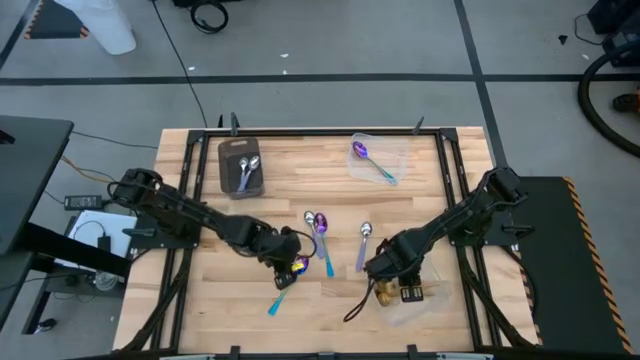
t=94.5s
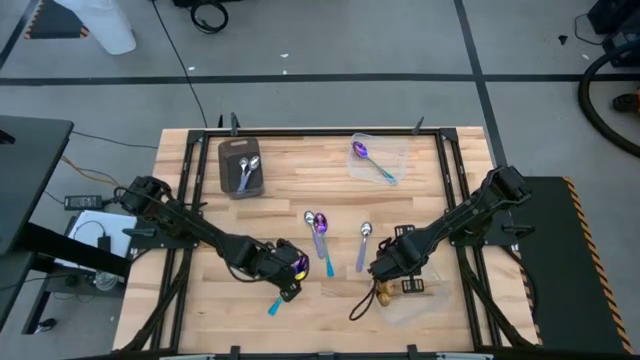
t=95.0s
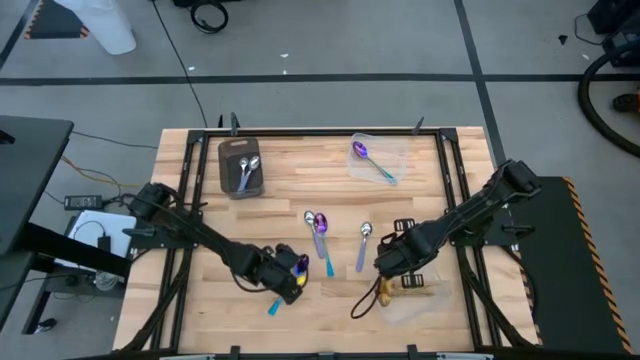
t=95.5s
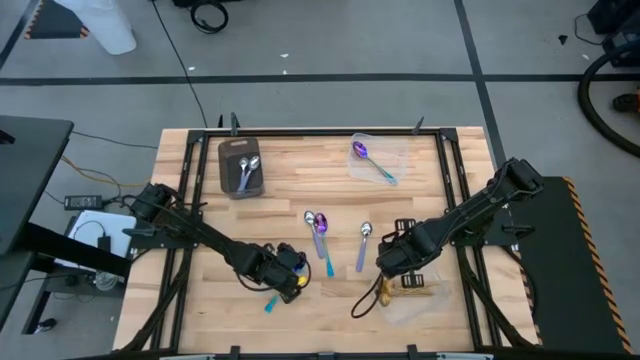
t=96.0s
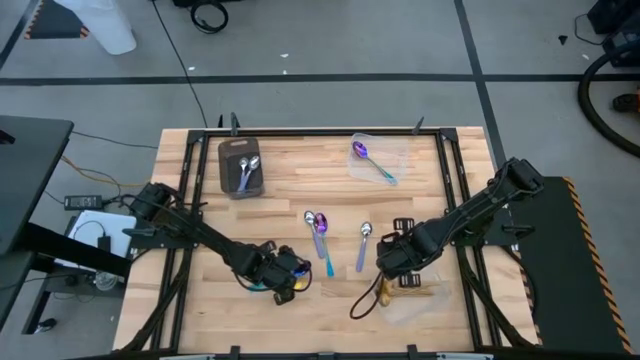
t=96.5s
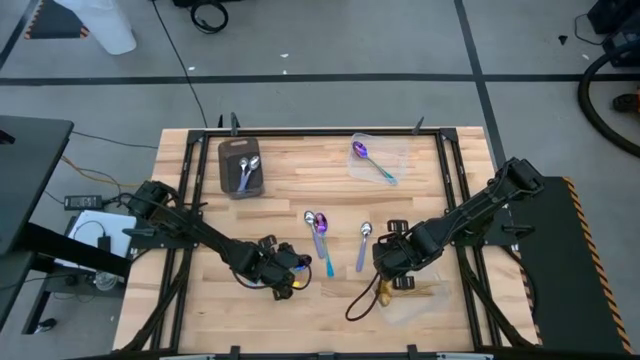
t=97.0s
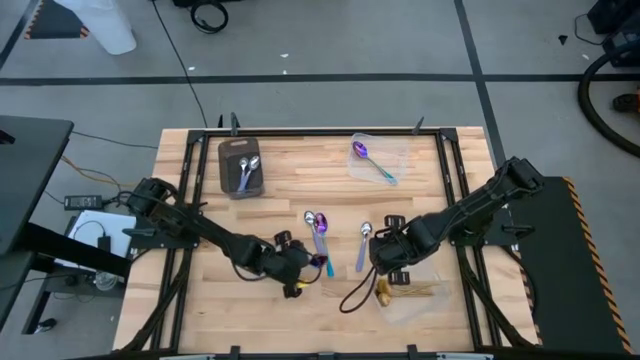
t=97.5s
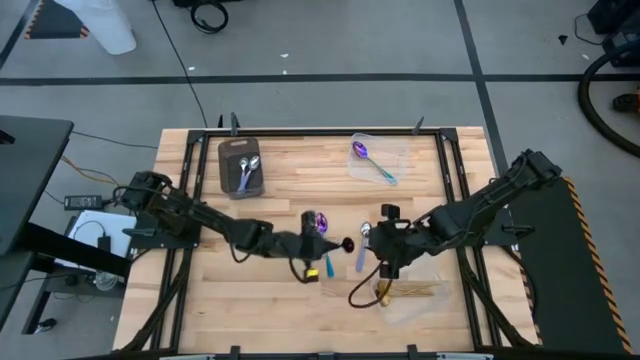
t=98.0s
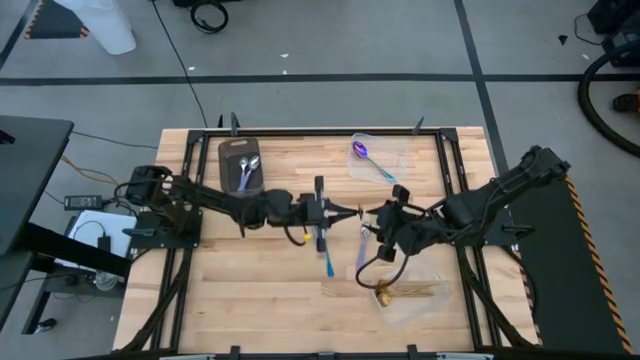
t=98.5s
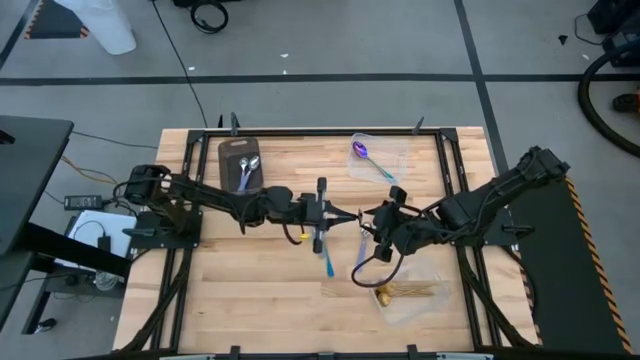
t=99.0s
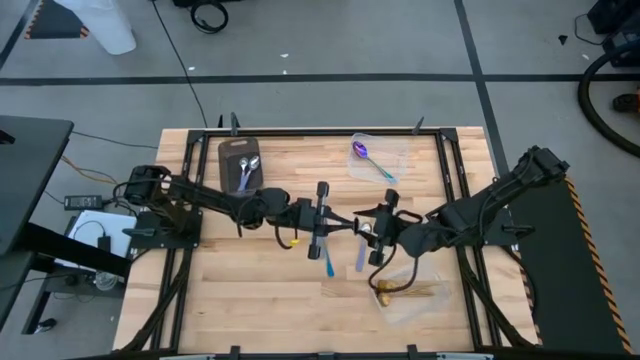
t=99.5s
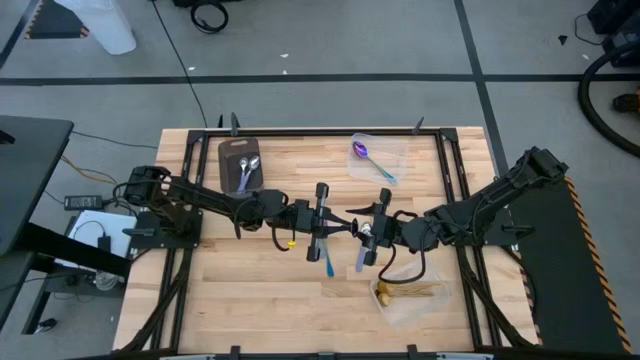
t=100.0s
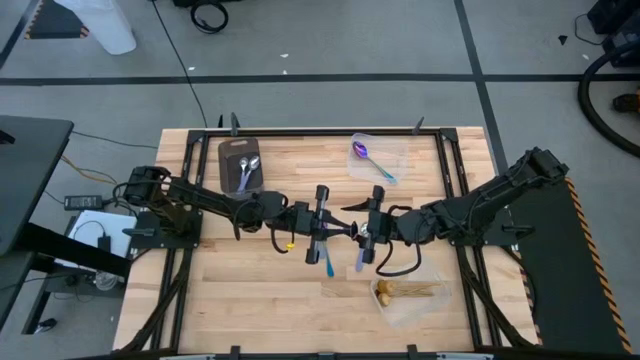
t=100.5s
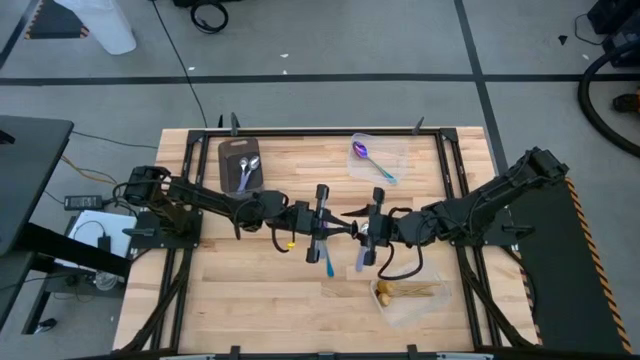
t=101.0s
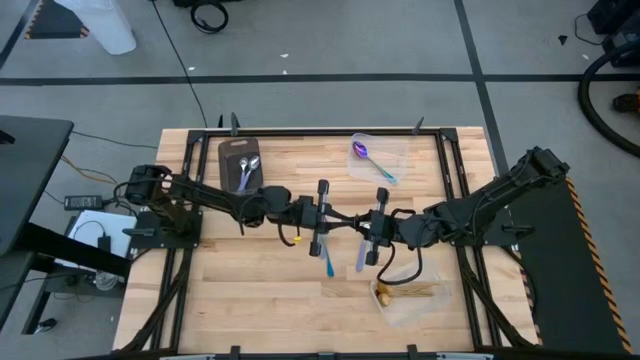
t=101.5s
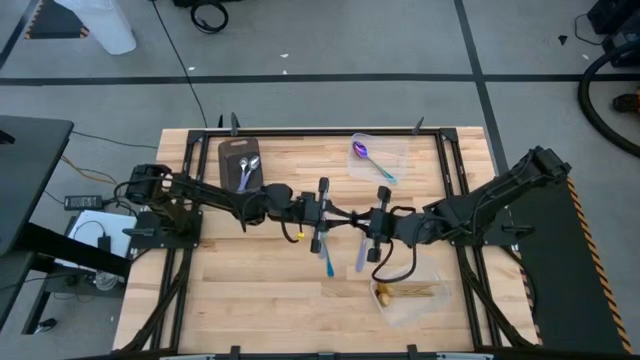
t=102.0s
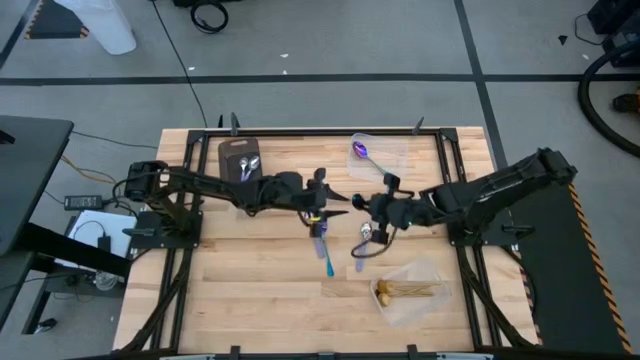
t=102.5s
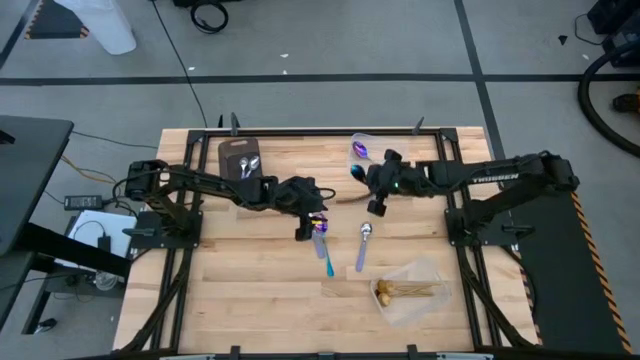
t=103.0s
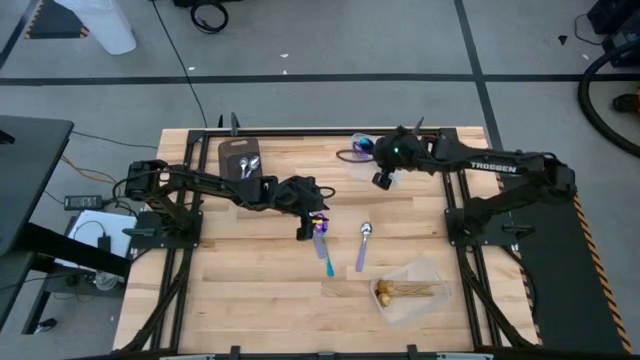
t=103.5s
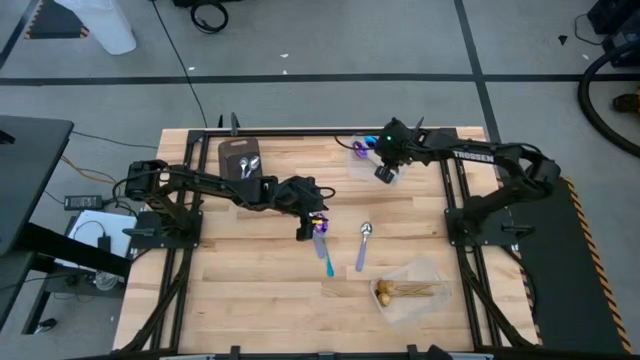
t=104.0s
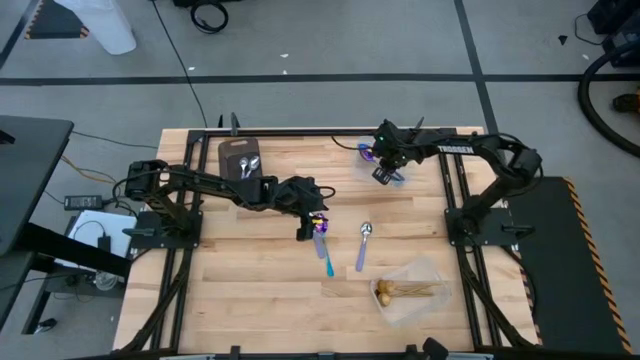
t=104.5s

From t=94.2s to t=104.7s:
Task: Sort silverware by color (type)
Put the blue spoon into the top transparent bin

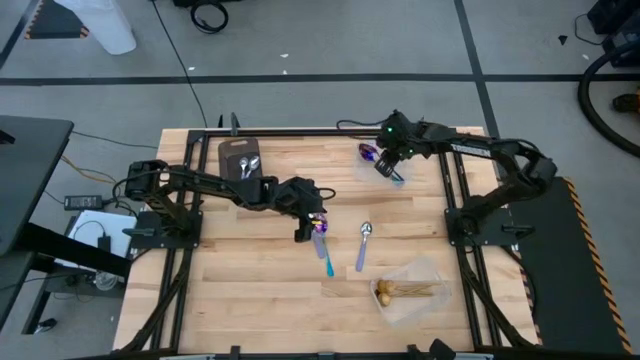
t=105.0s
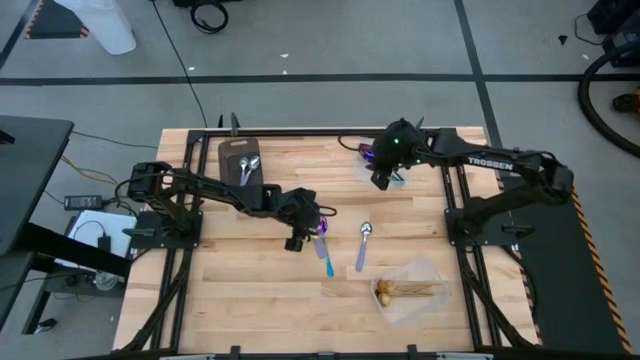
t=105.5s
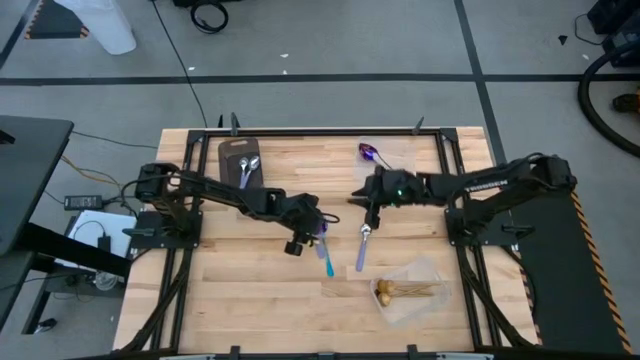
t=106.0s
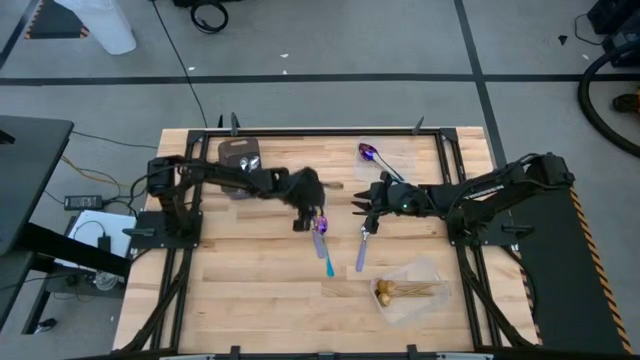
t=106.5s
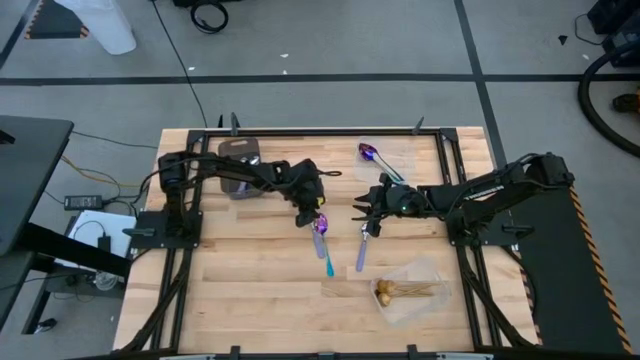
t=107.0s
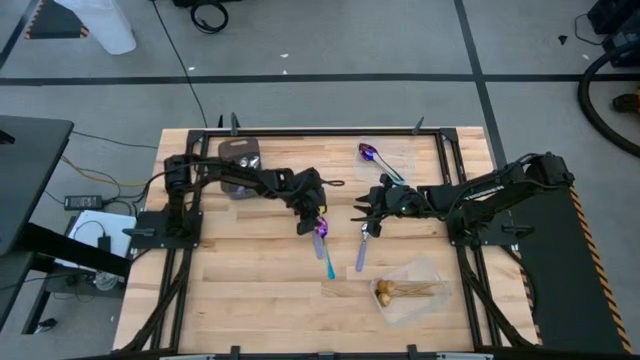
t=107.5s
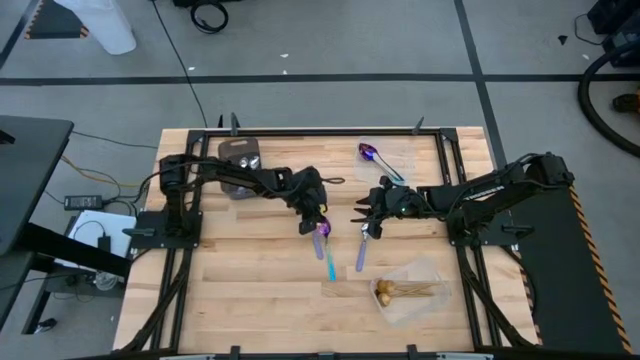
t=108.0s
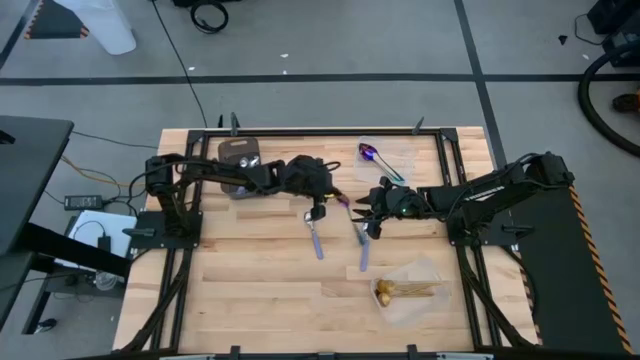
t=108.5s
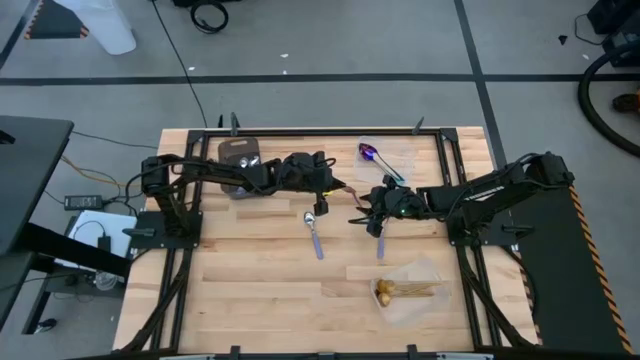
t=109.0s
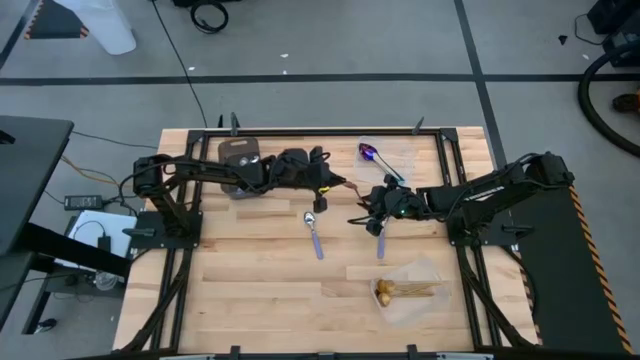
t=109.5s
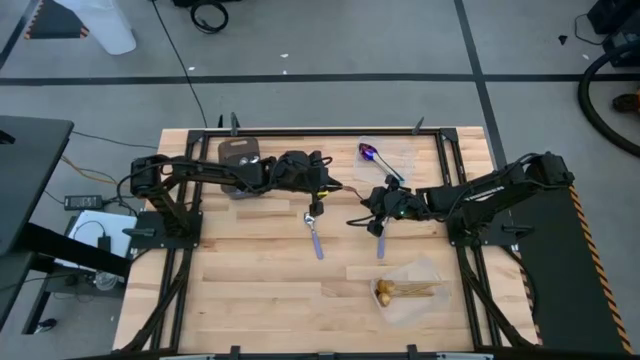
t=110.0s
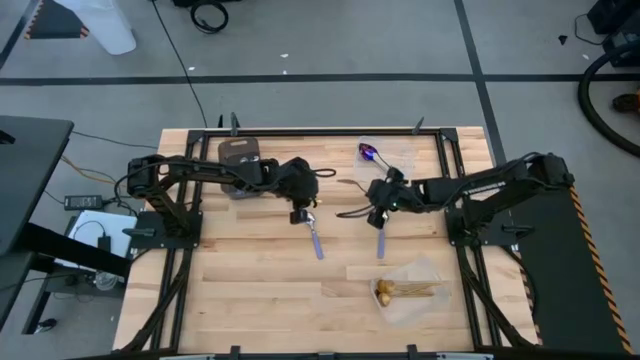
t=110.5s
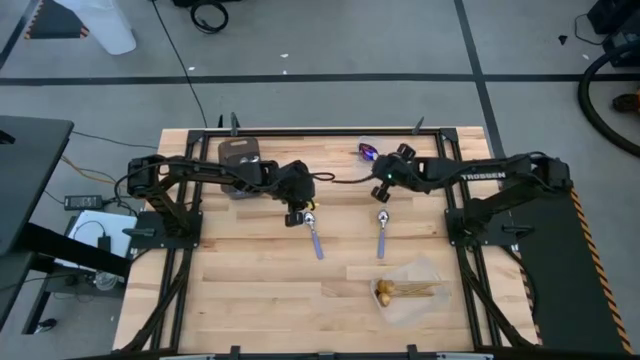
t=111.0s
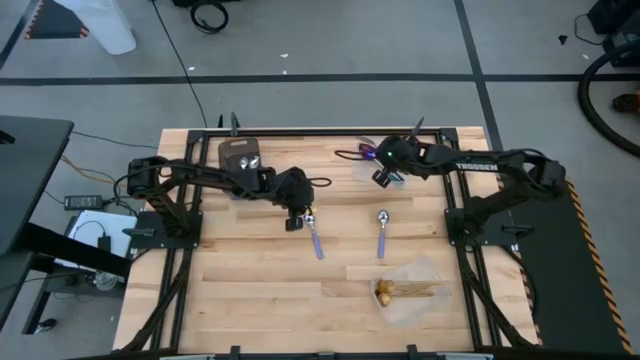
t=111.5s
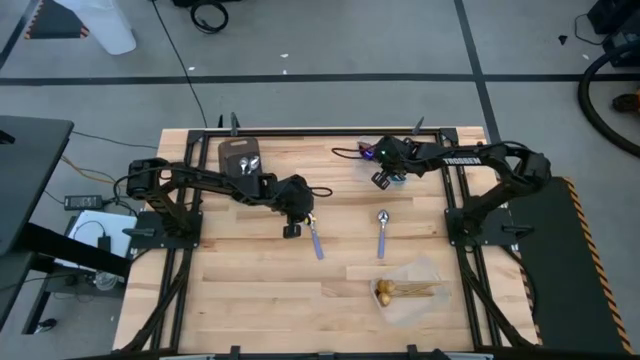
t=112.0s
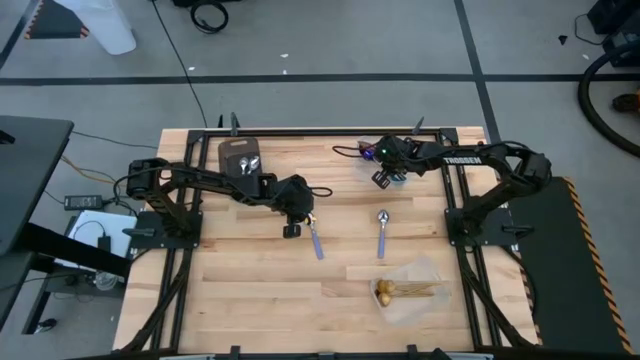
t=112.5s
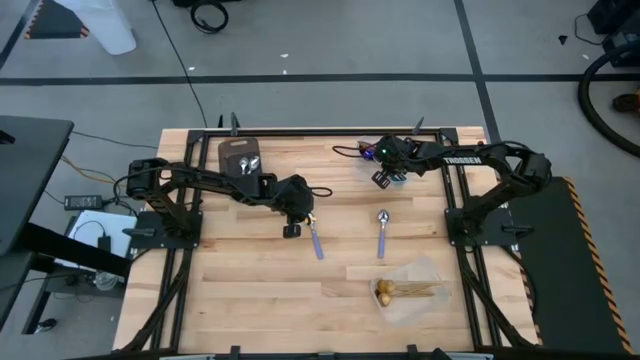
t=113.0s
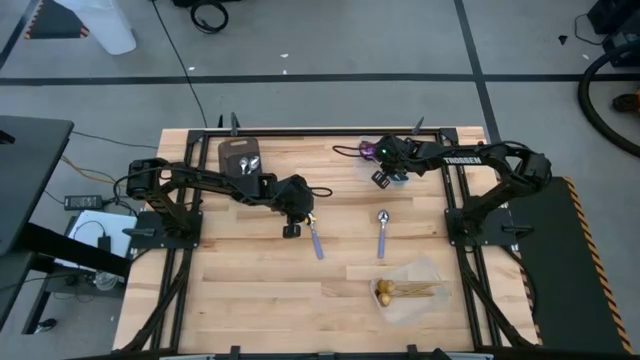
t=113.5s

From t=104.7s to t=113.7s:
Put the blue spoon into the top transparent bin

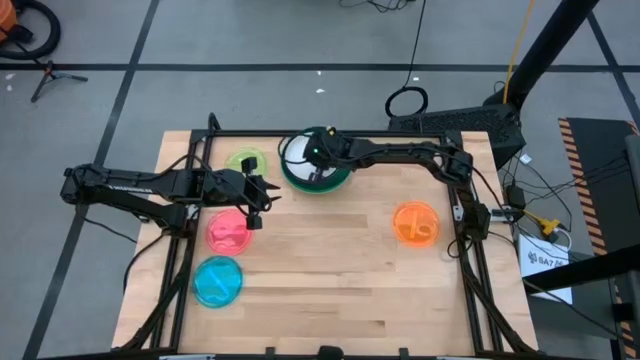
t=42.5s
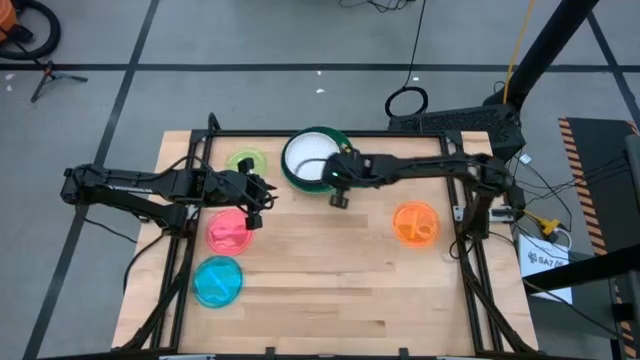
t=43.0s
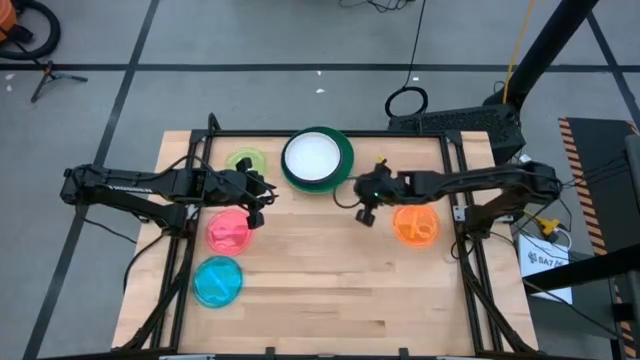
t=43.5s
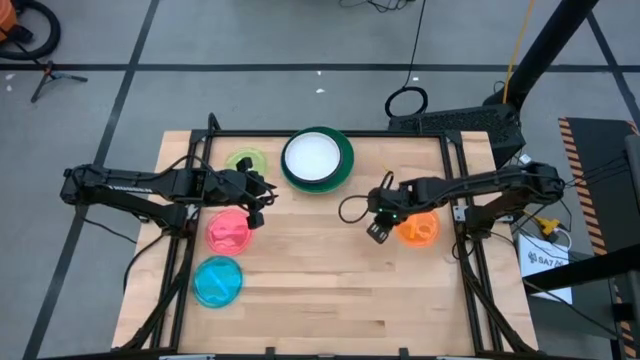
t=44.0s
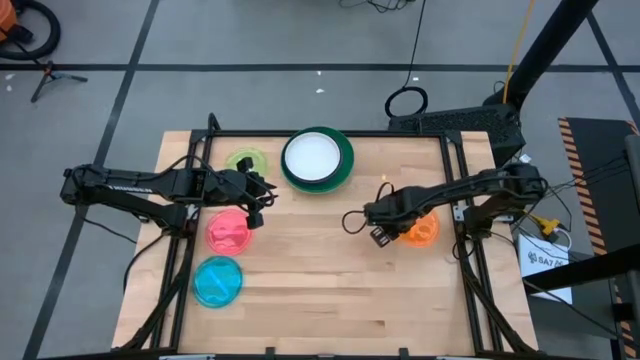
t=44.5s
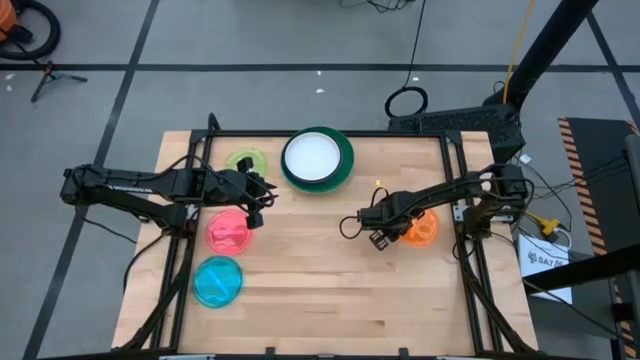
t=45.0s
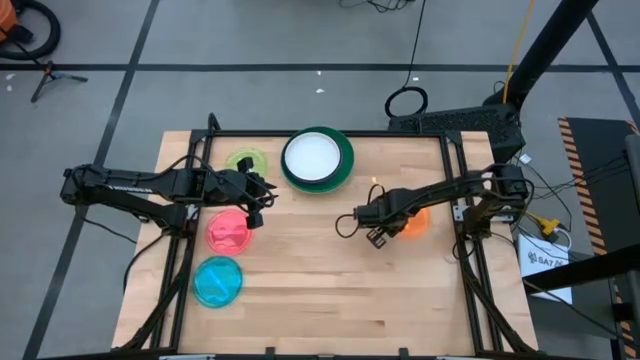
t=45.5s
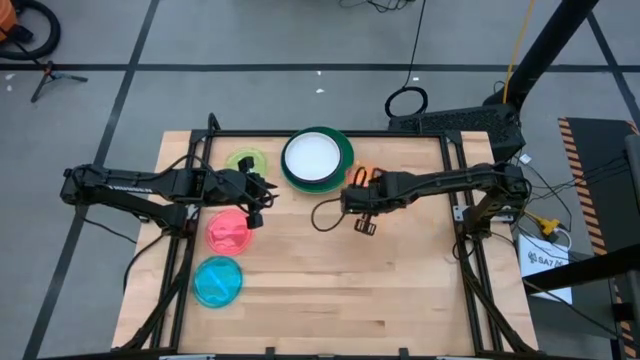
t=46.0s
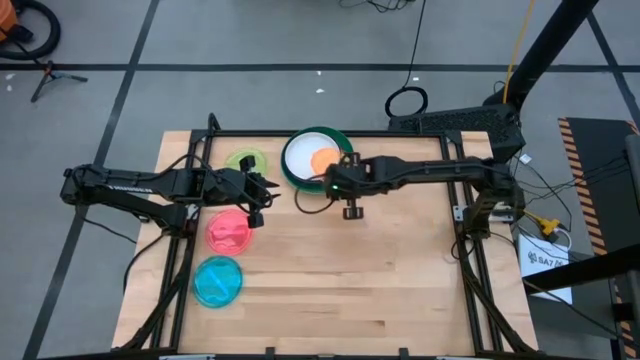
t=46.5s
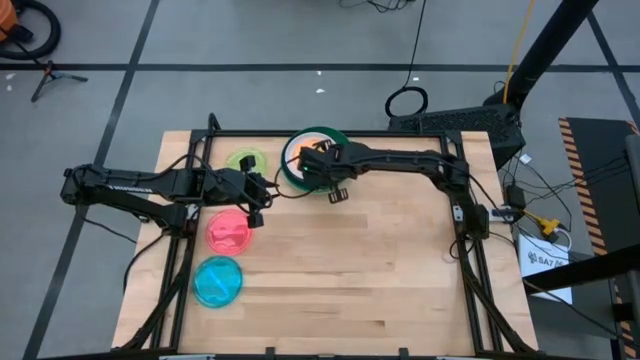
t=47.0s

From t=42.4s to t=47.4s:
Task: Stack plastic plates
Stack the light orange plate on top of the white plate
